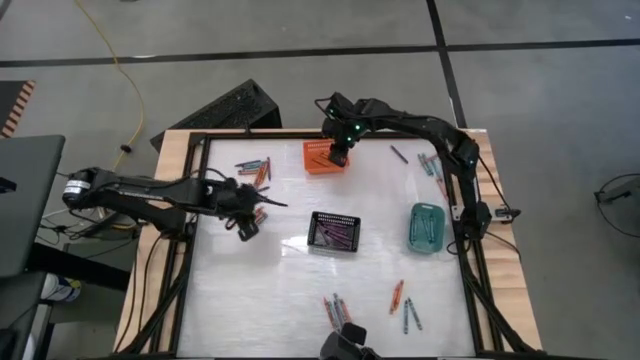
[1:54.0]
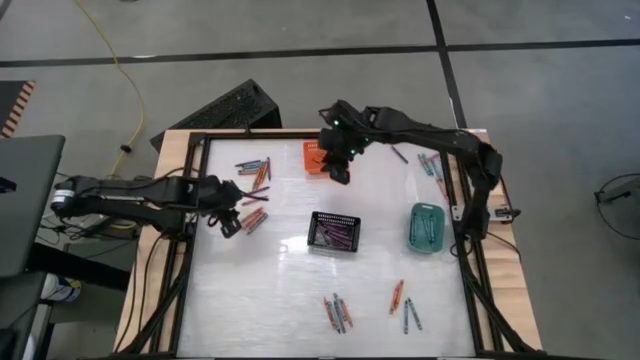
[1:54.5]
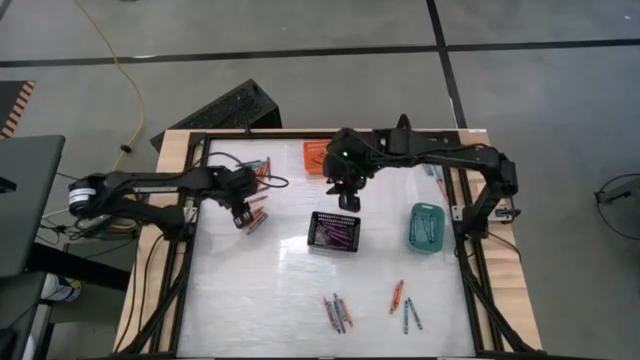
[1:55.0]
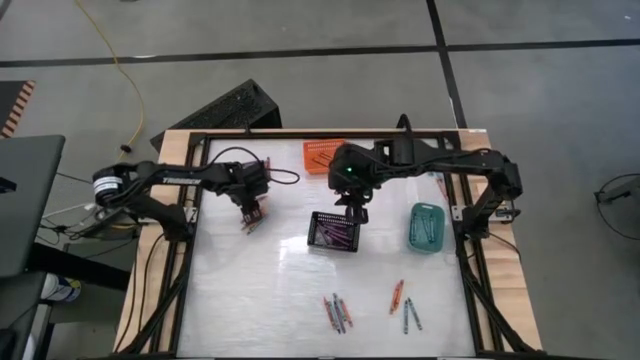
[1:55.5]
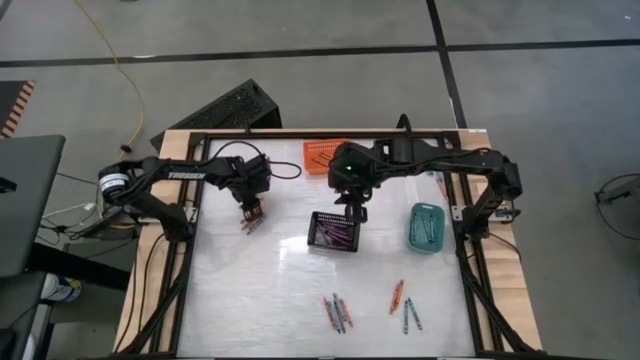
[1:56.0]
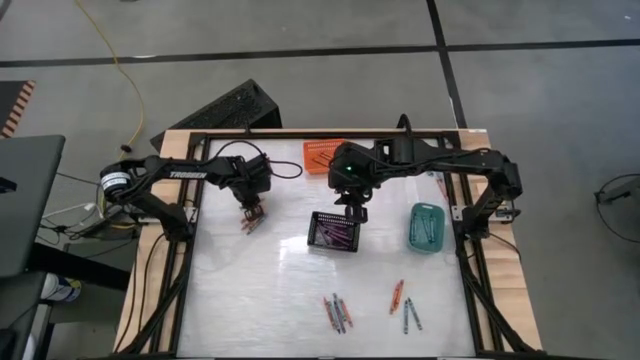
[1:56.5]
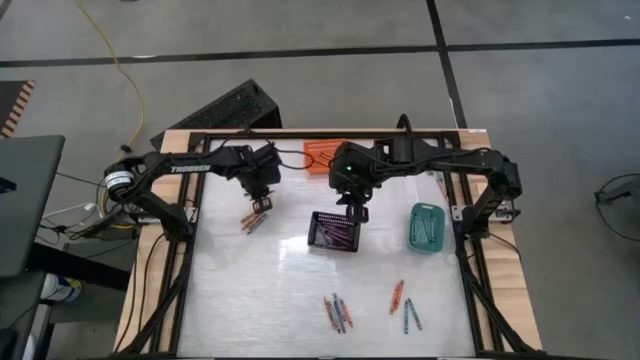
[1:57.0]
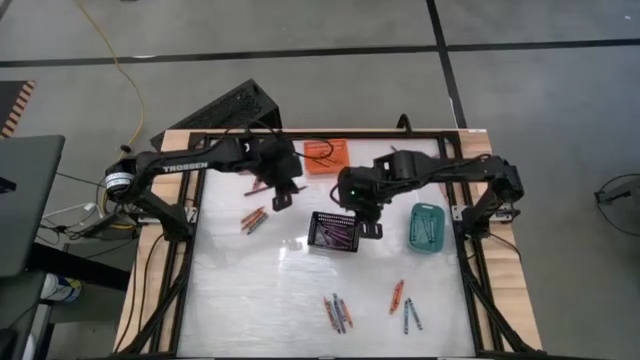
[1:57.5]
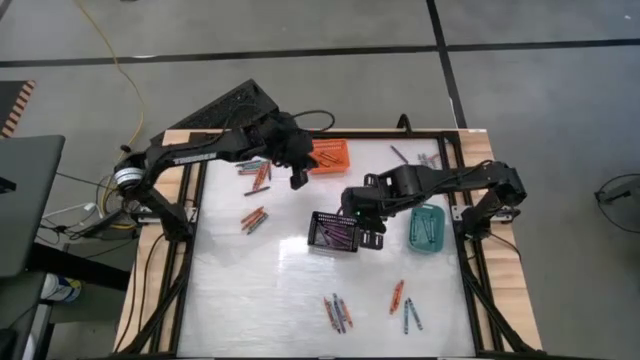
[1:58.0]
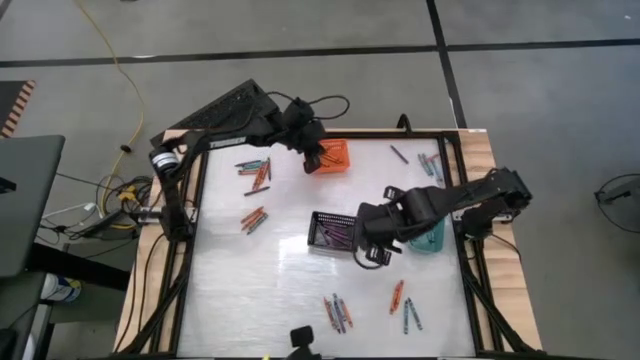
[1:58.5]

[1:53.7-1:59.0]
Task: Sort crayons
Put the orange crayon into the orange bin

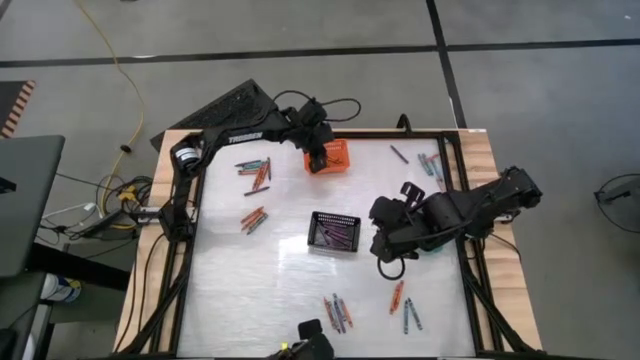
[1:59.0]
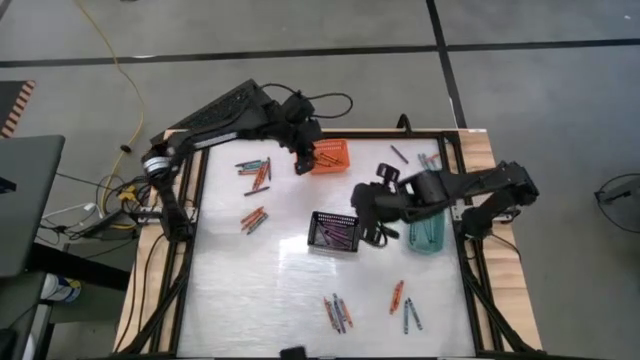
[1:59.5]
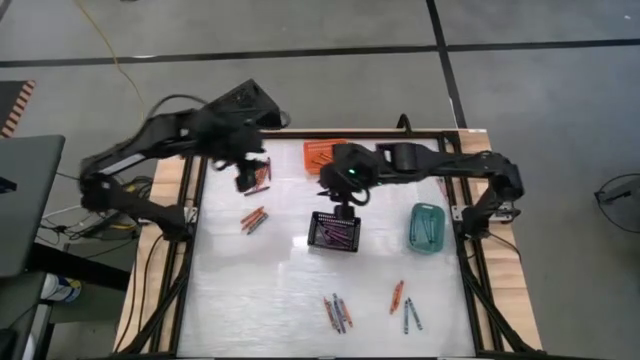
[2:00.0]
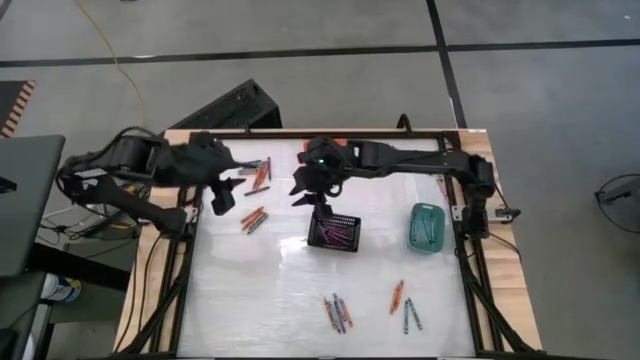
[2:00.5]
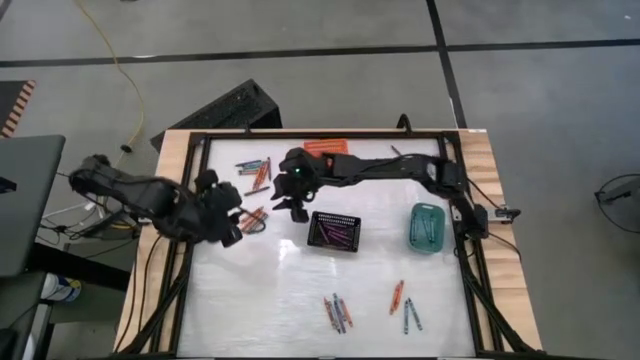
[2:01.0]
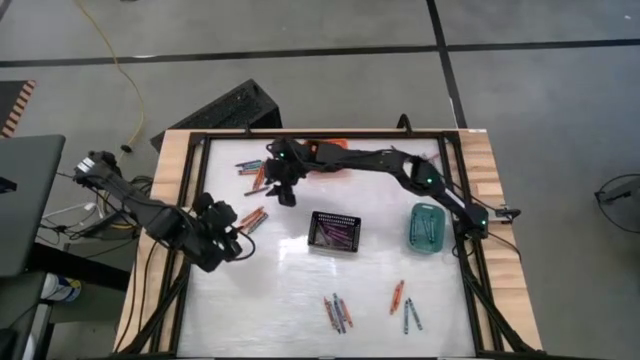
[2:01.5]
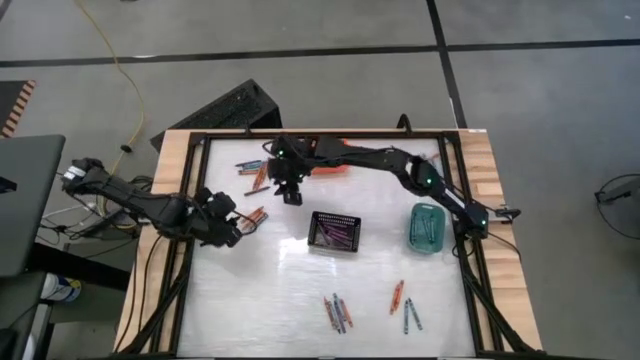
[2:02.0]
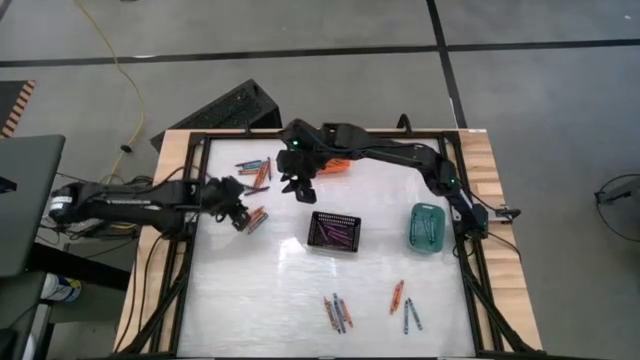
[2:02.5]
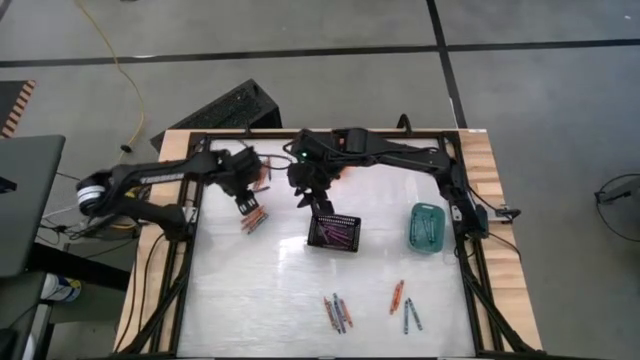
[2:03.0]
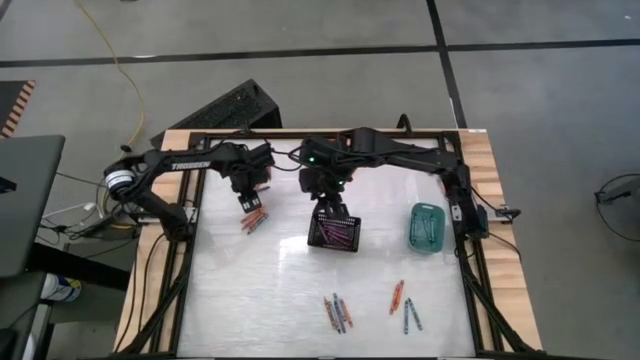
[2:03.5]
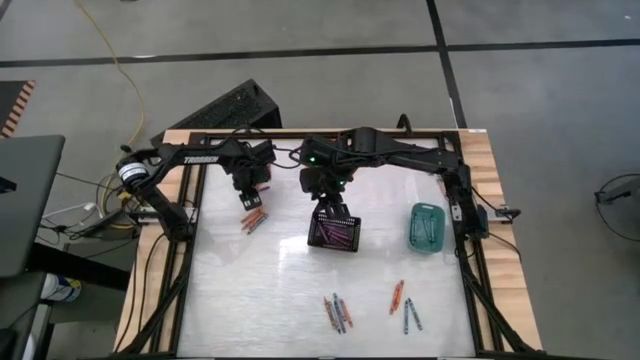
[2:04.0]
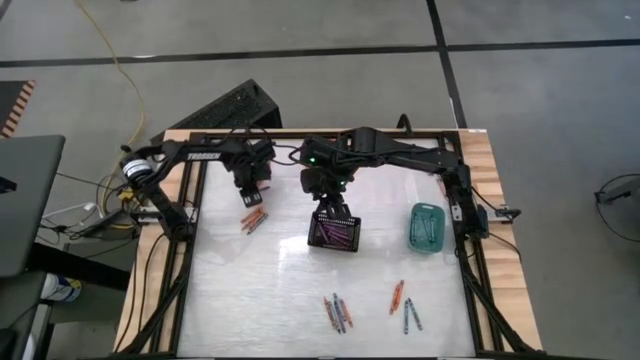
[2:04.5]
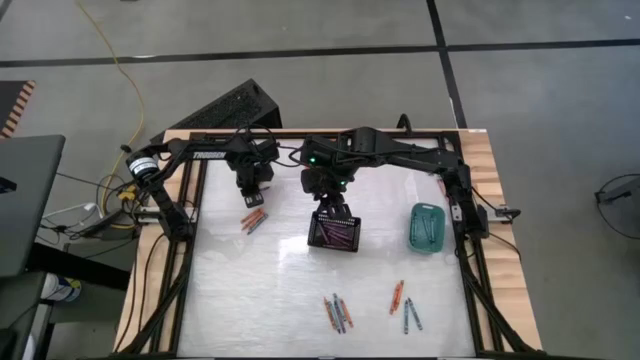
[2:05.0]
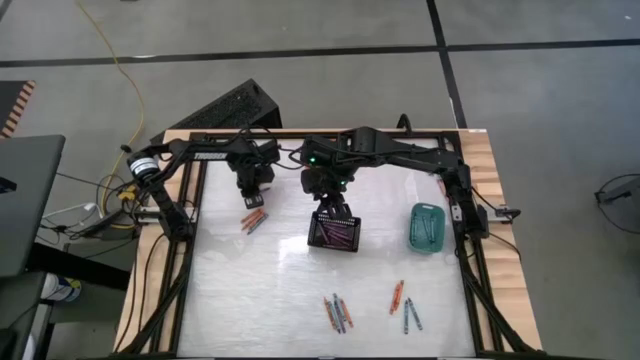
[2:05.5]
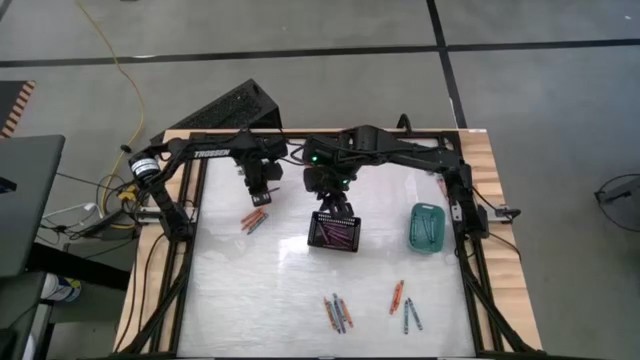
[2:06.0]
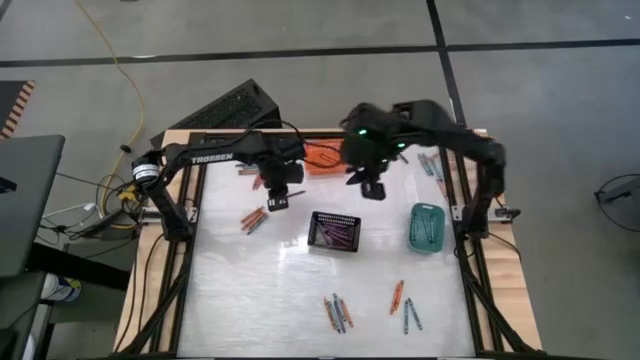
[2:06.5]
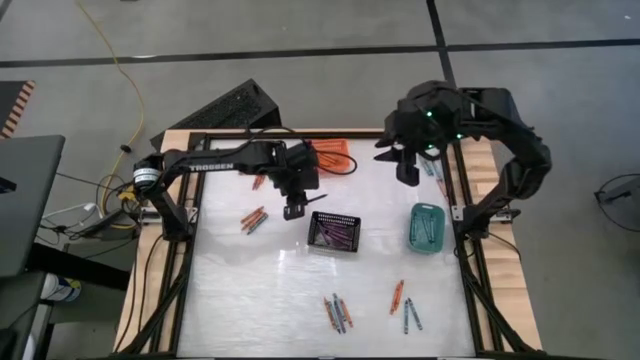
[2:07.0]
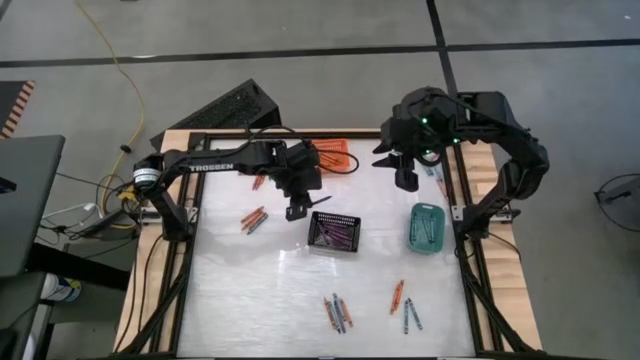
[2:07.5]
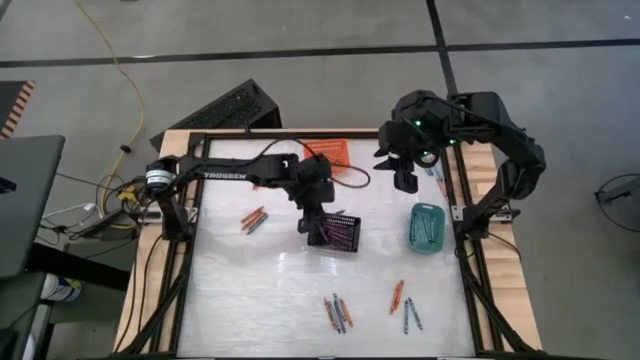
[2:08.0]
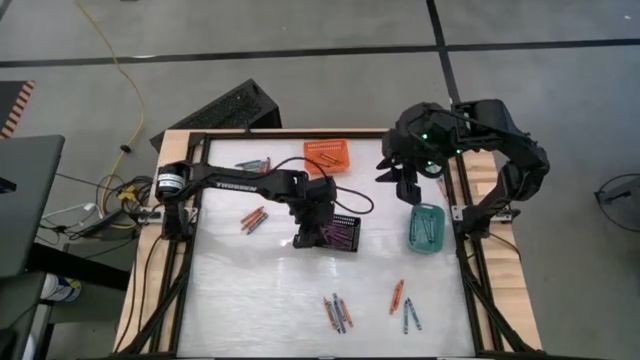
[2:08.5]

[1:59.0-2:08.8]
Put the violet crayon into the black bin

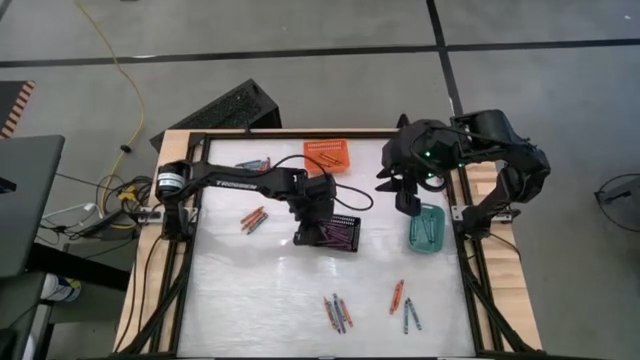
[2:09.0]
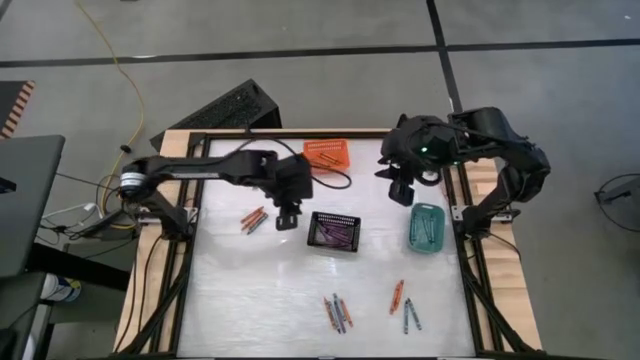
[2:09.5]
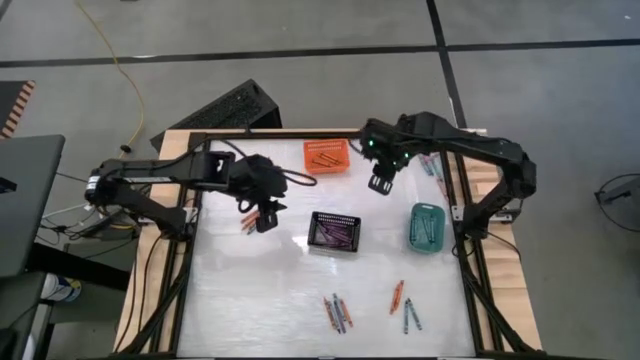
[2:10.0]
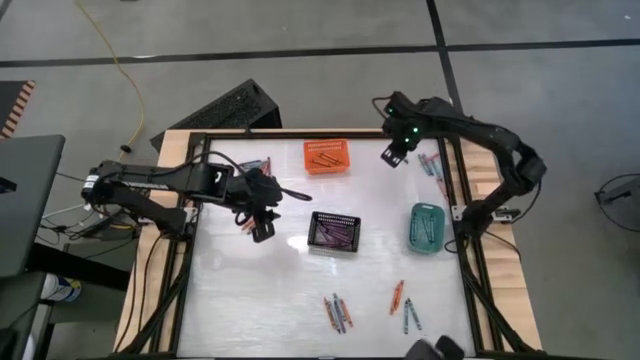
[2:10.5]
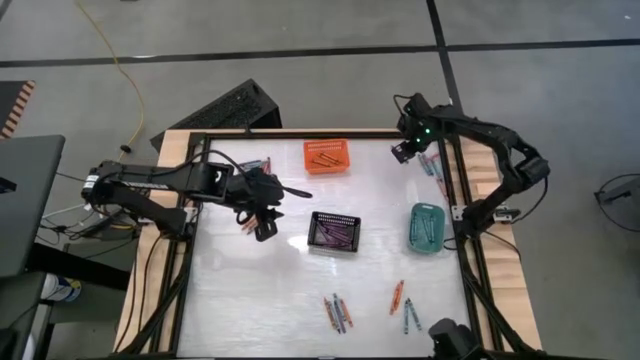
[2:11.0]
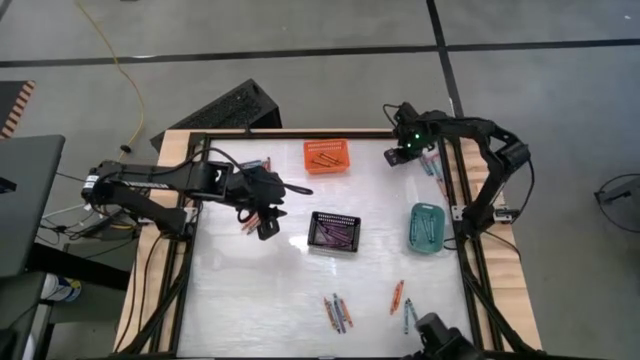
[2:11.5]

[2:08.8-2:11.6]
Put the violet crayon into the black bin

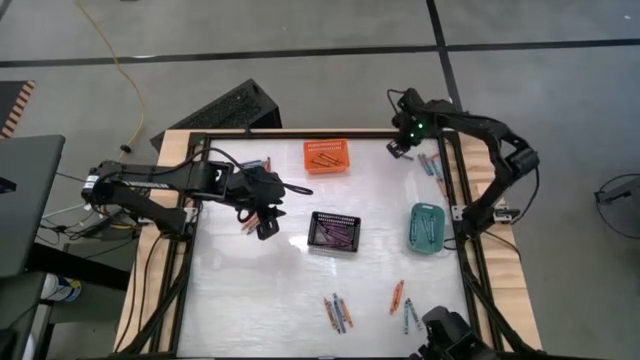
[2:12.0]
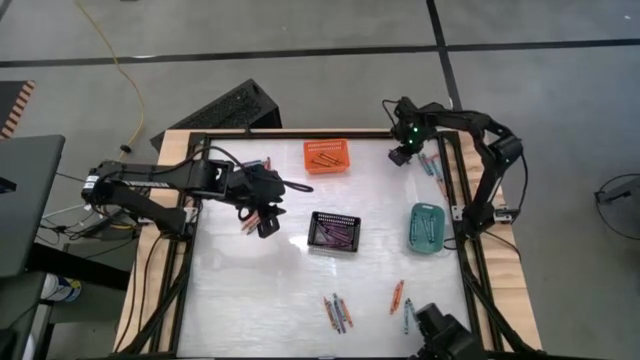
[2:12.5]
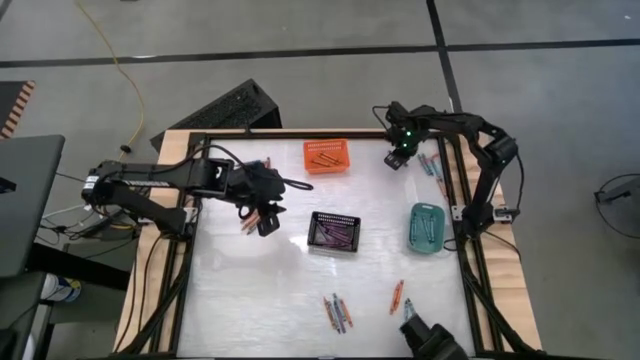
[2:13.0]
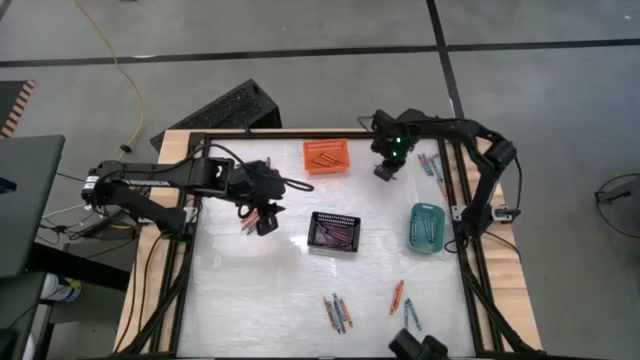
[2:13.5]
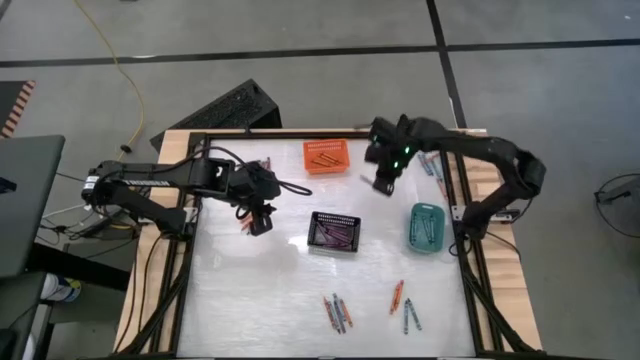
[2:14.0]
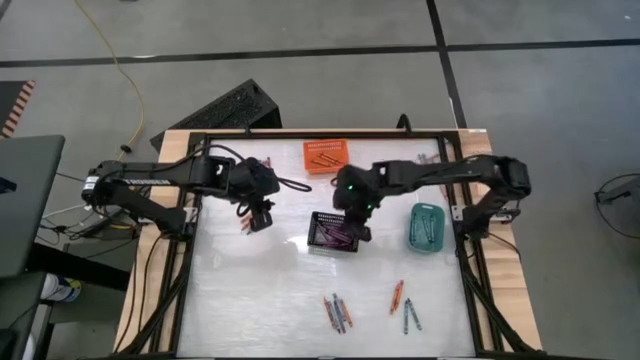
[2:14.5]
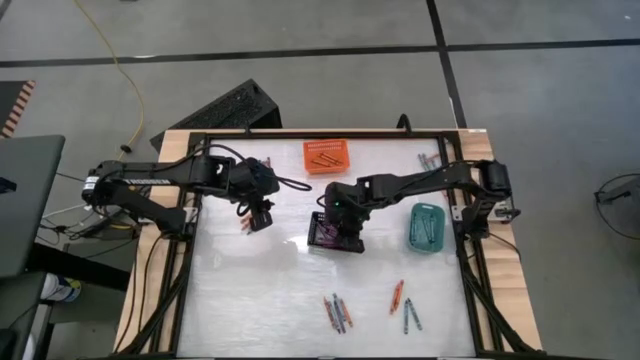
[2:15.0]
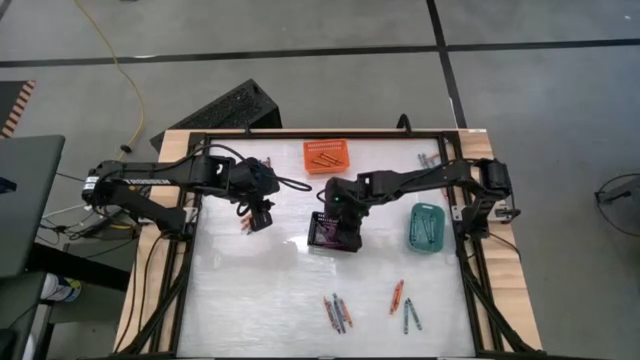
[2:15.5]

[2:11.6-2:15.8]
Put the violet crayon into the black bin
